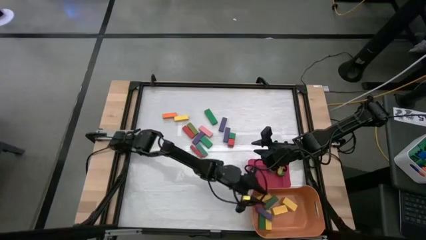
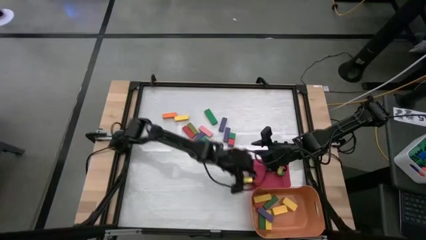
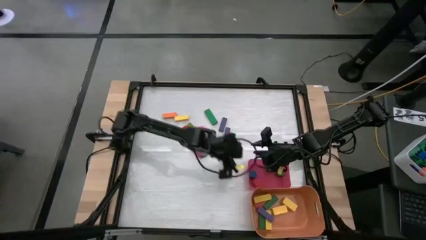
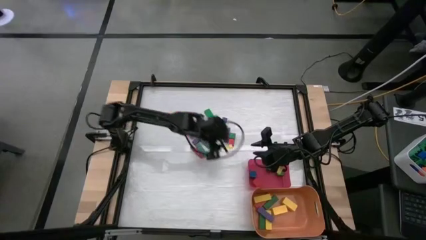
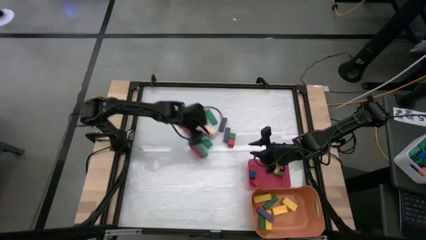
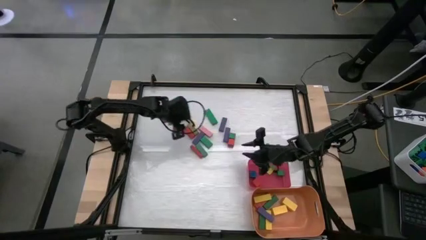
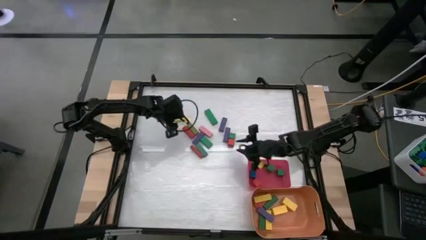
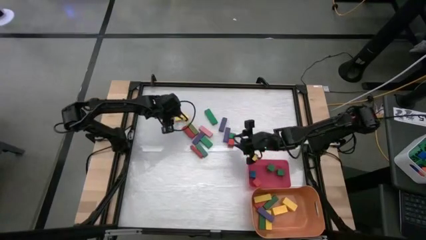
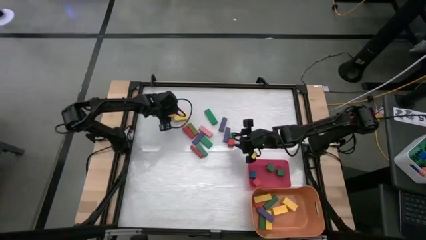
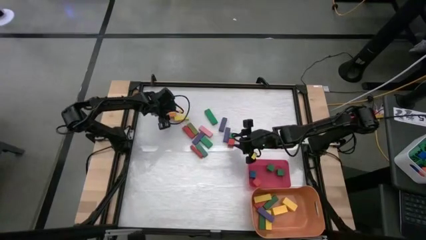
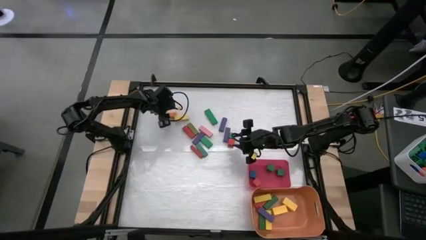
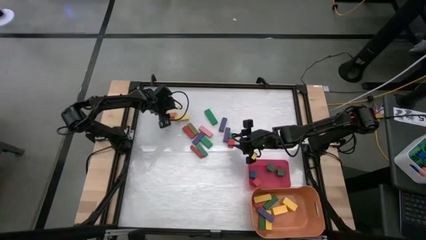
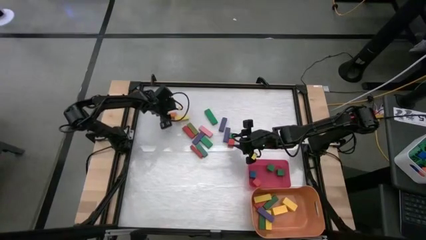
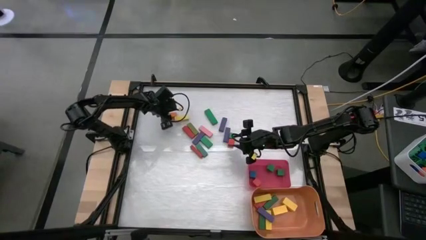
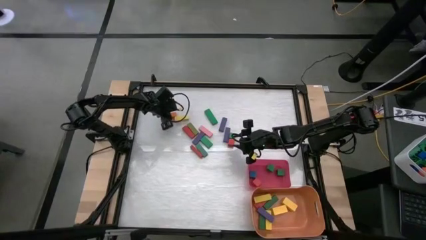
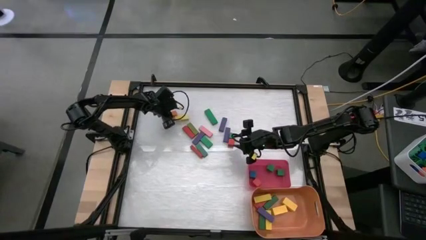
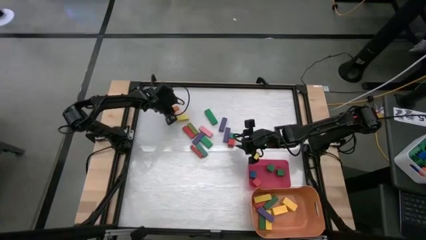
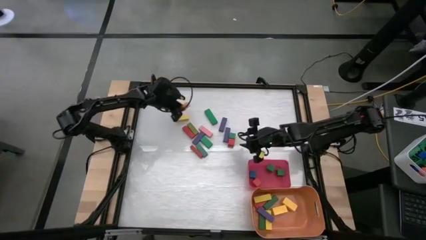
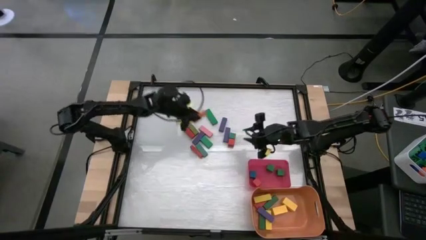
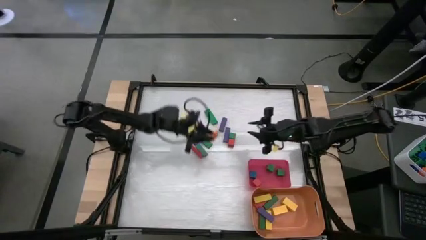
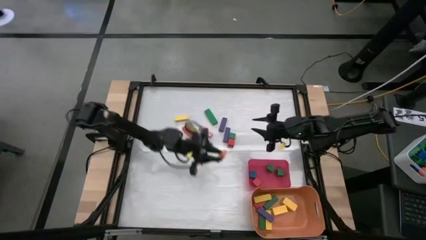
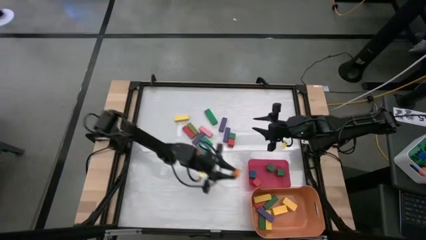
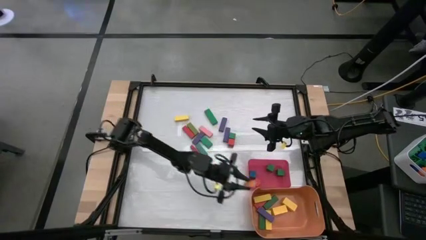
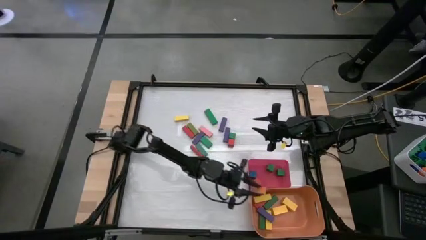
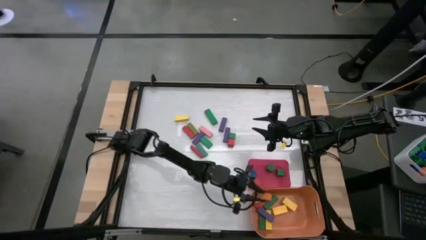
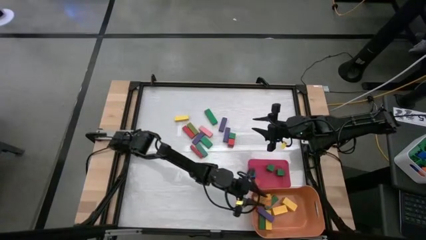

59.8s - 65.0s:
Task: Sort blocks by size
Put the orange rectangle block into the orange bin

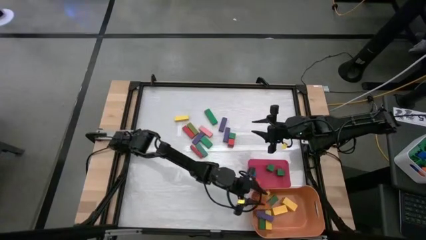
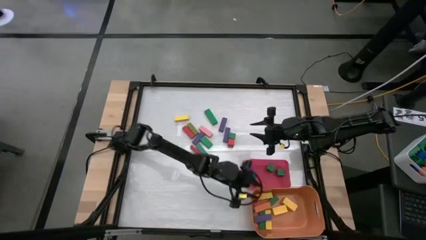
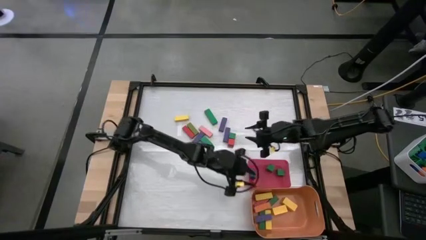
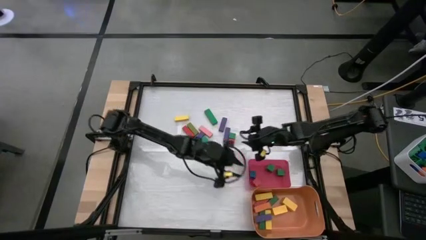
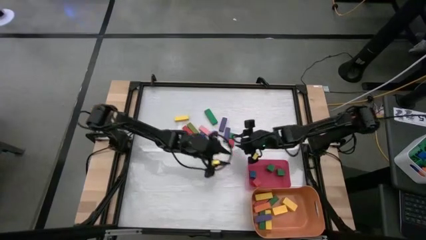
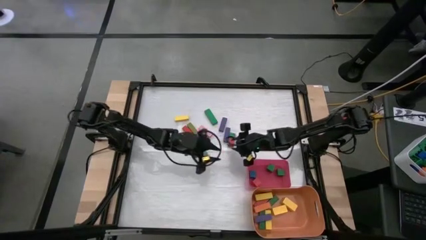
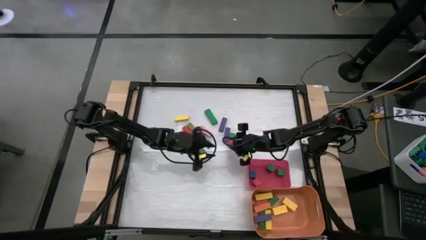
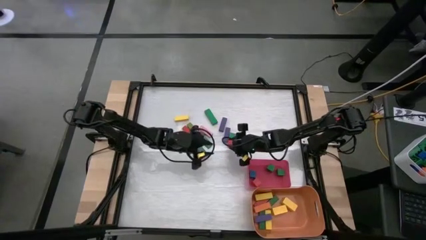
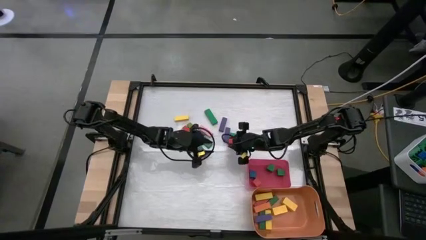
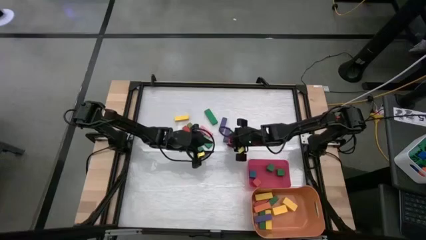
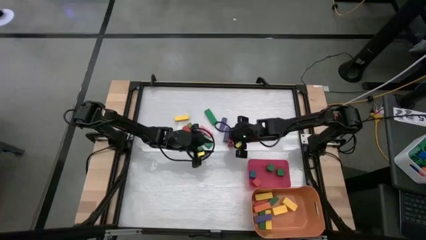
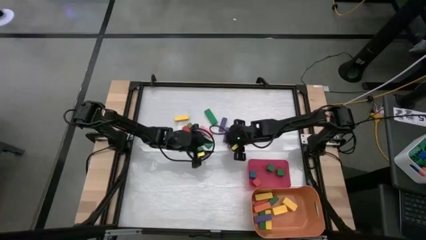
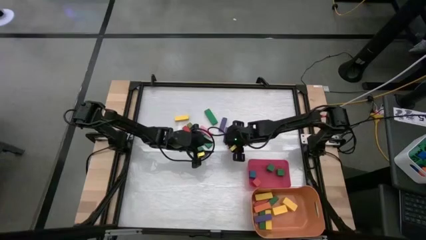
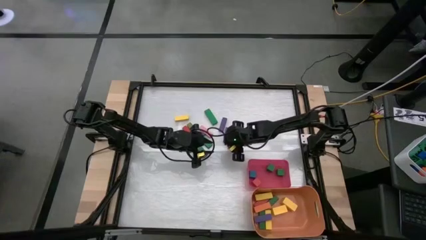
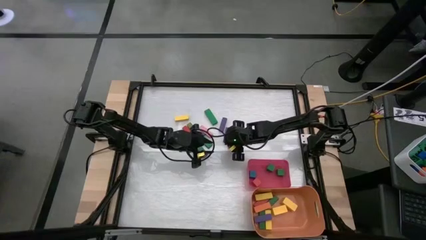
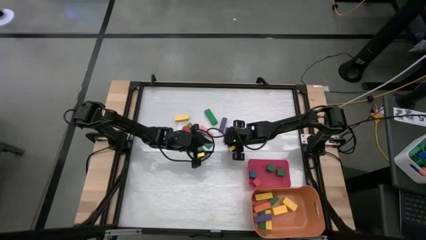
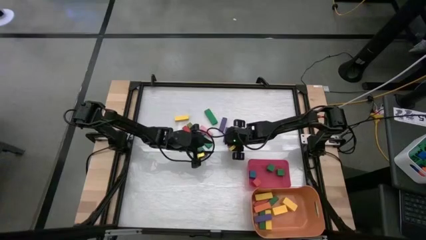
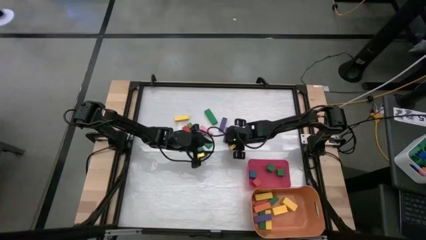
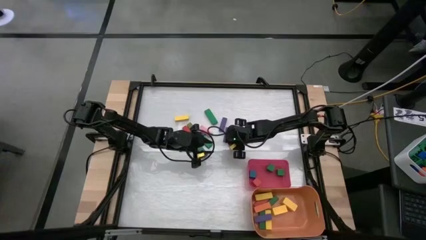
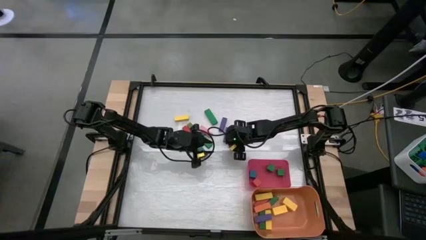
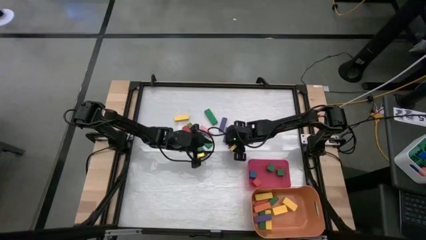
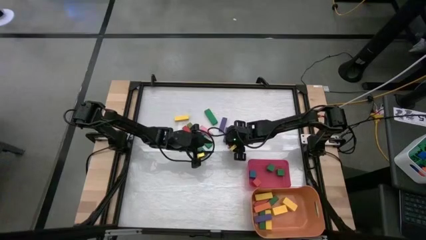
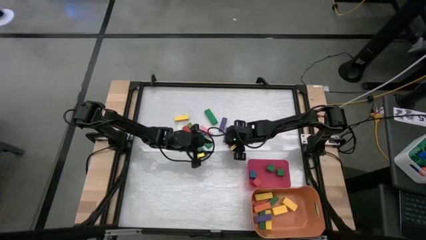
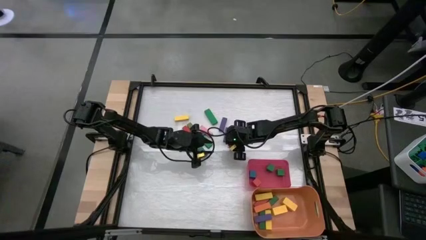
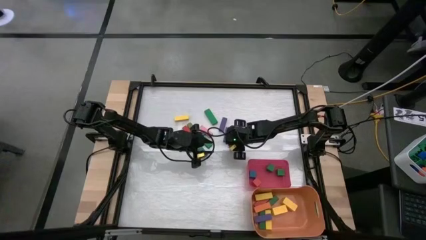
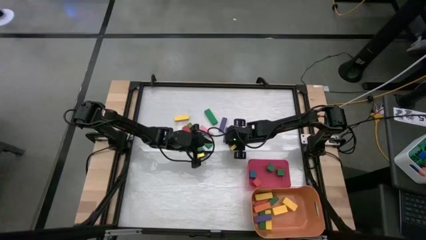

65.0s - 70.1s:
Put the red square block into the pink bin

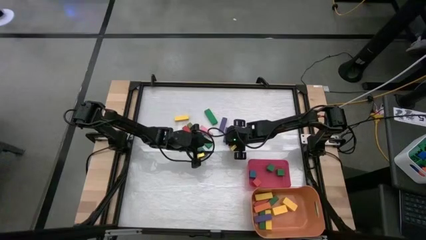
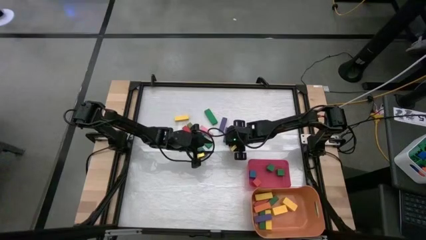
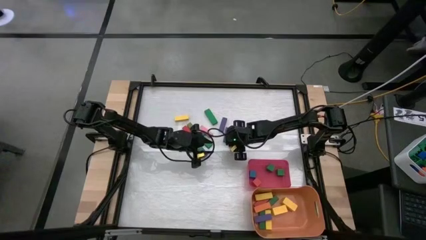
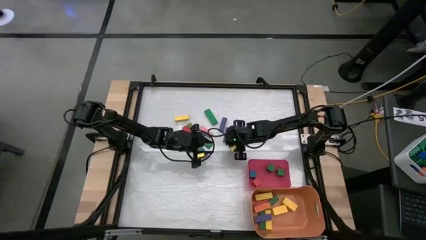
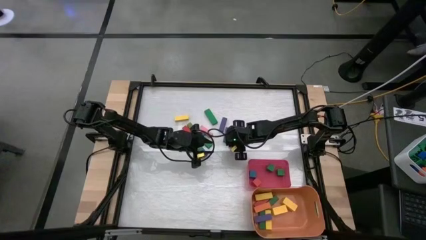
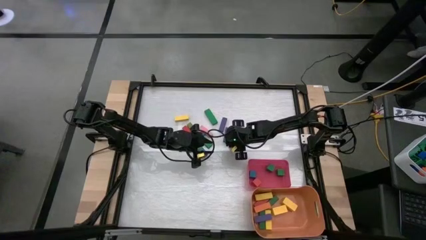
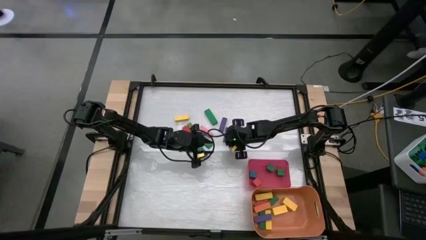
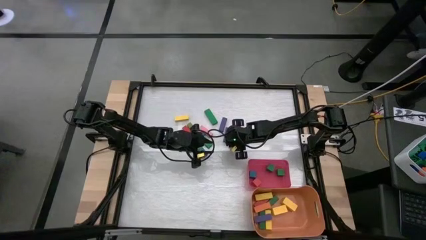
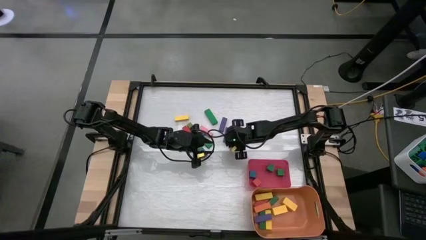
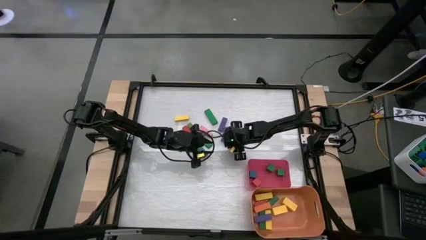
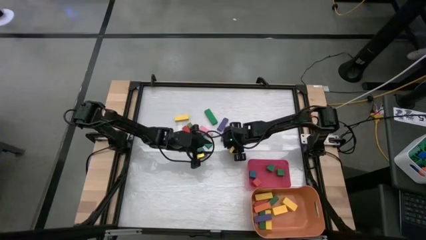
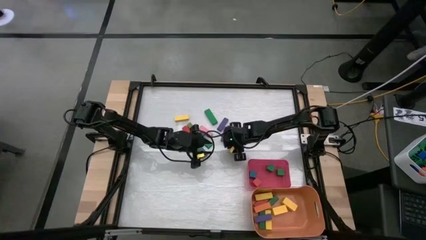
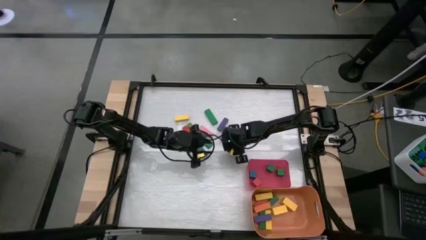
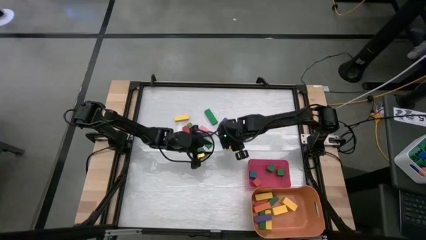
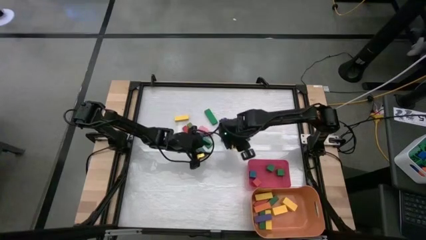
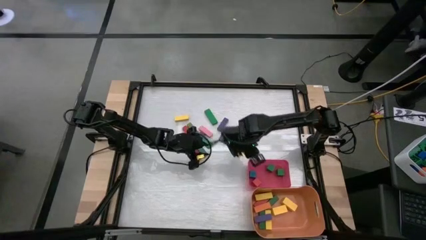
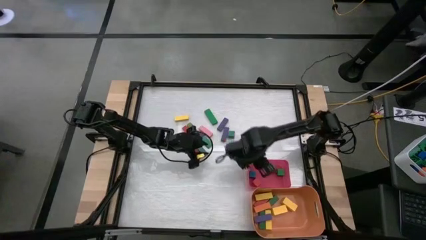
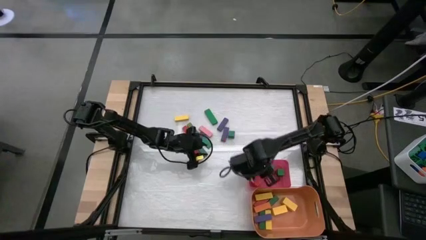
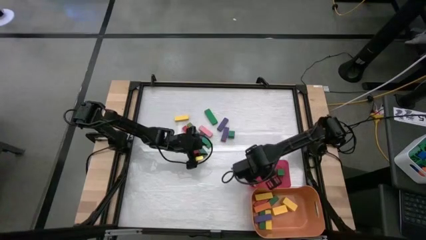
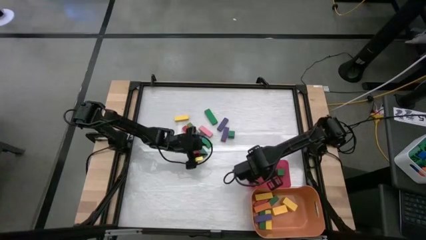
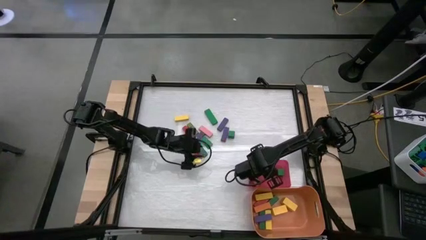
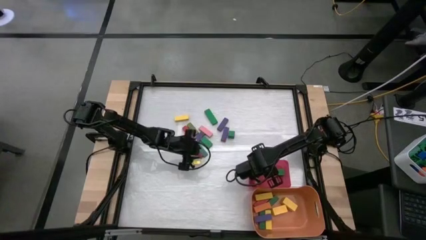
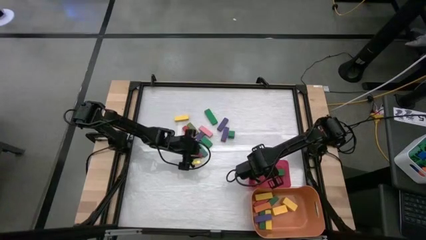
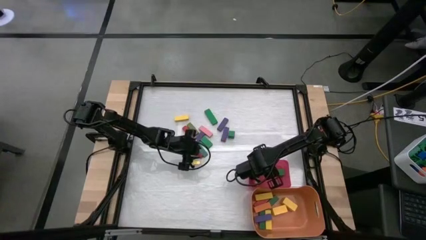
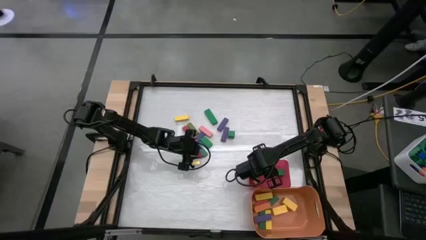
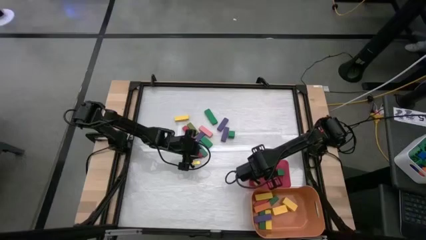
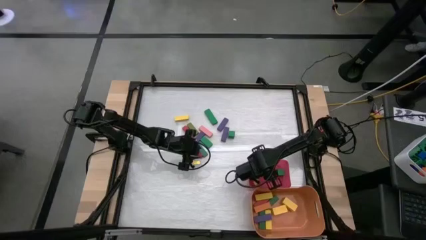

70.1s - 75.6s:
Put the red square block into the pink bin

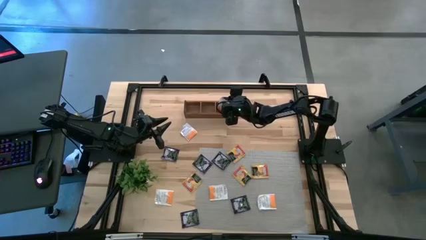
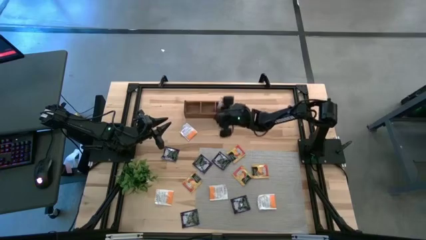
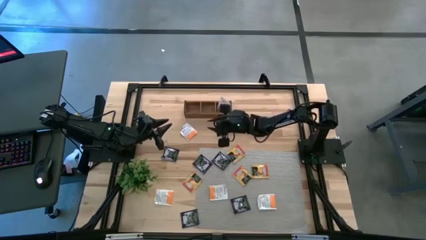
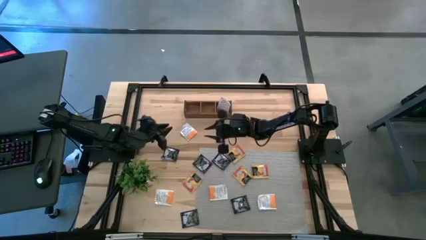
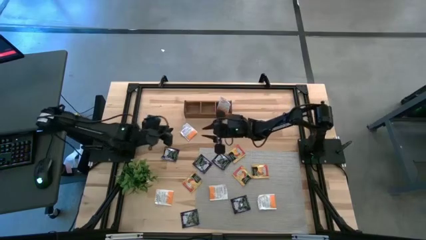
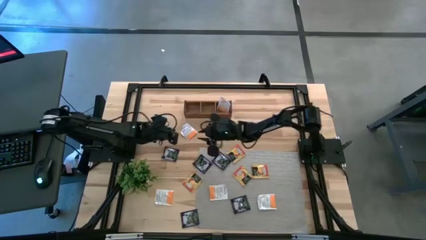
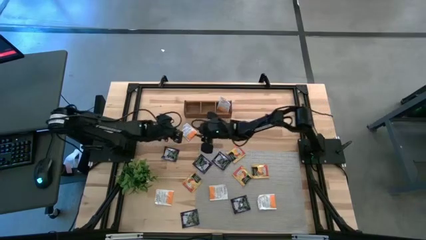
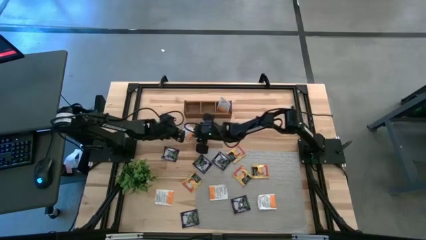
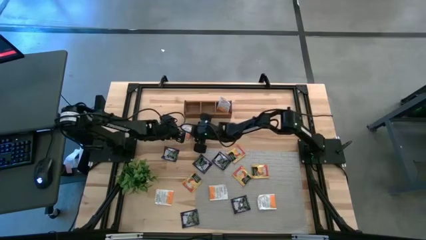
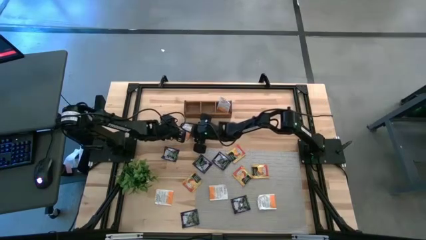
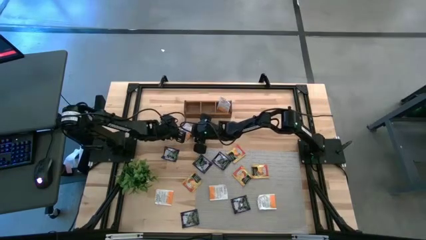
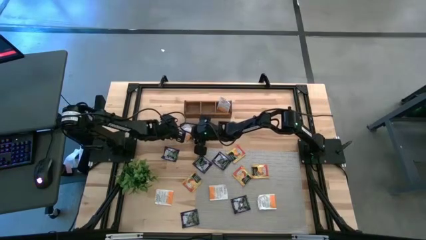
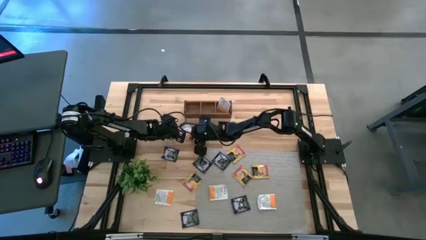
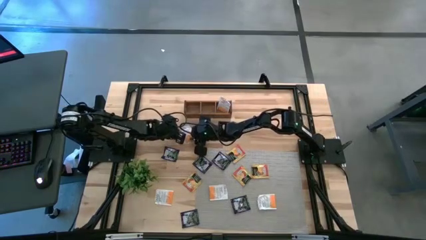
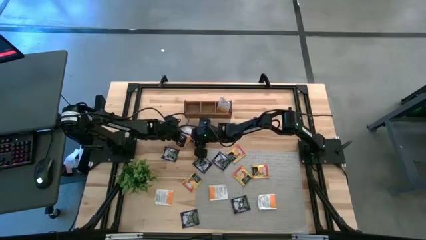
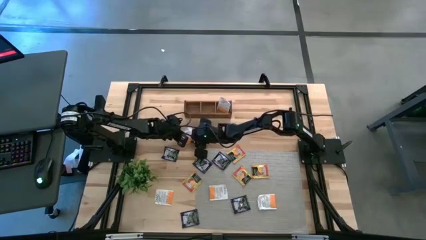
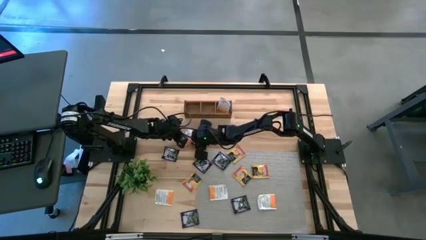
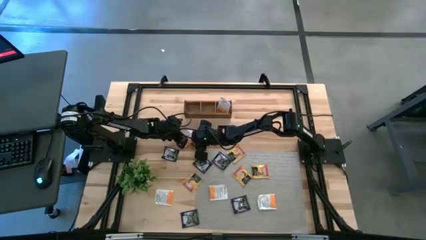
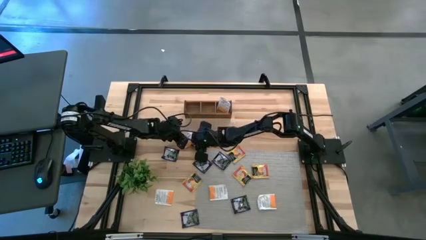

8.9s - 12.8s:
Task: Pick & Place Tea
Put the white tea bag into the right section of the wooden organizer
